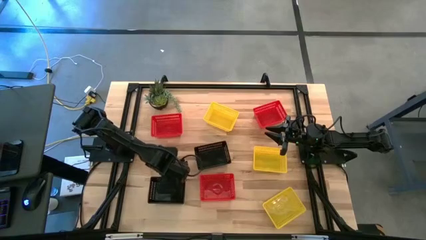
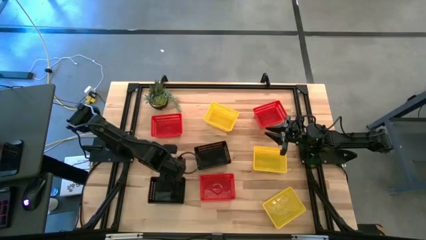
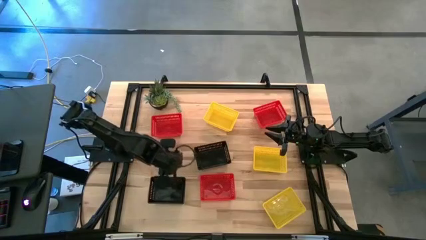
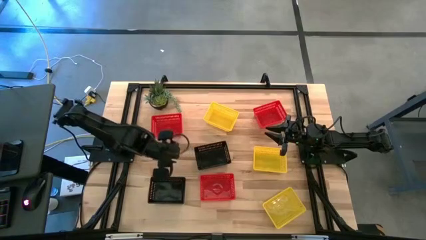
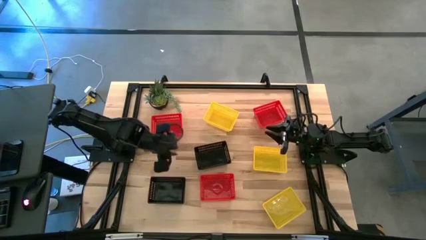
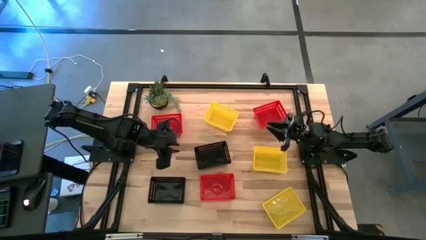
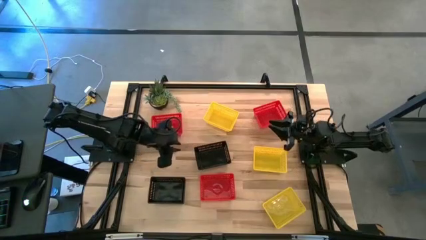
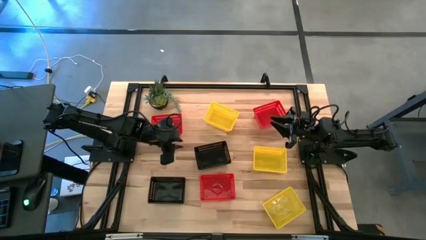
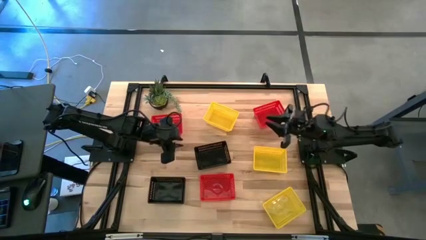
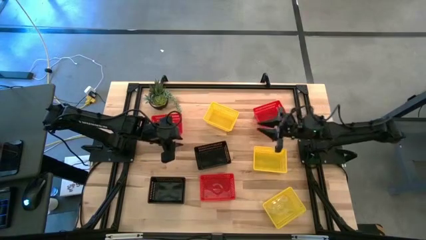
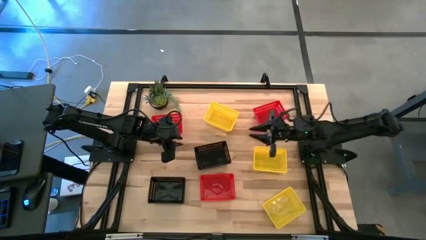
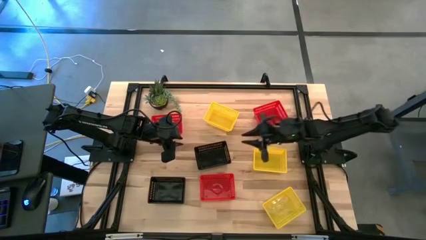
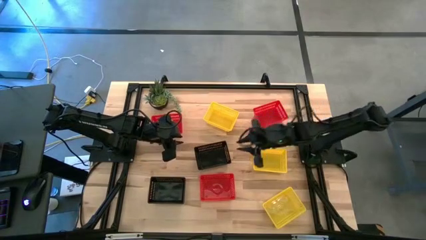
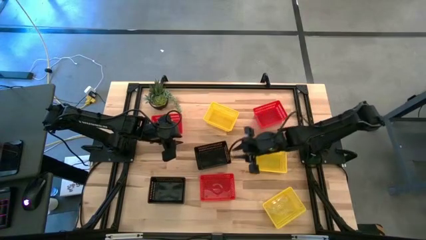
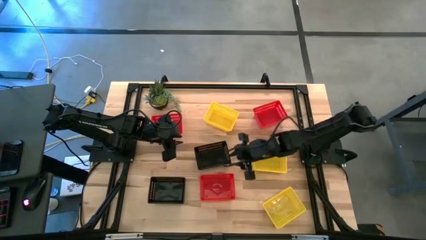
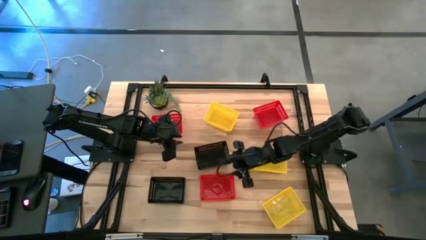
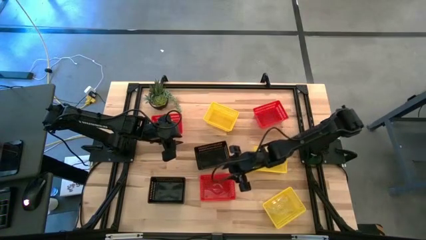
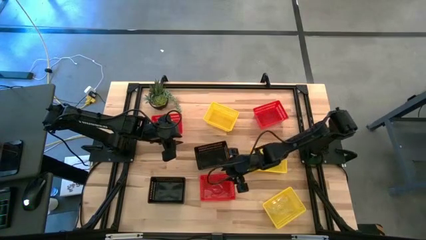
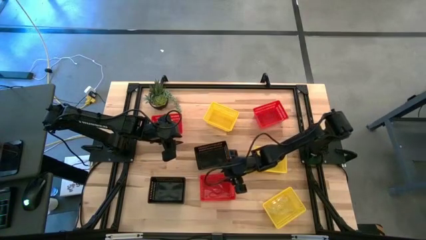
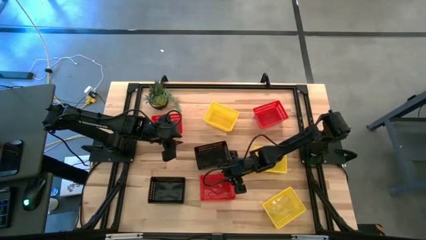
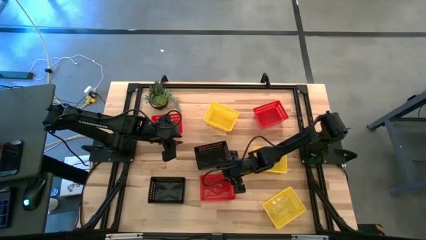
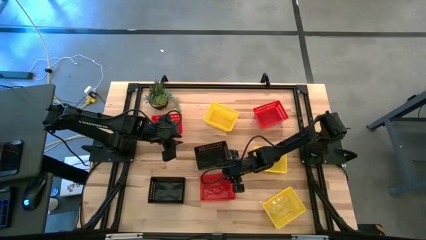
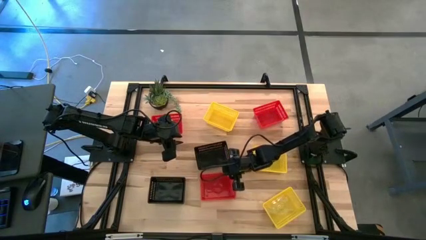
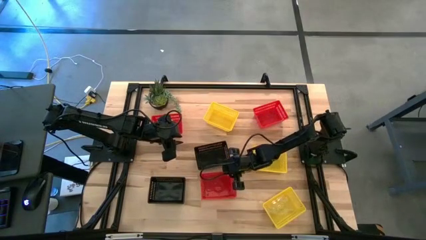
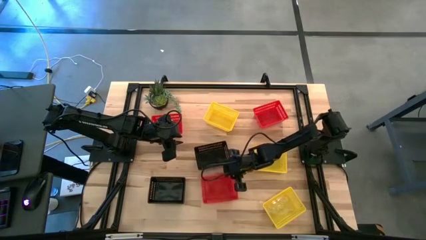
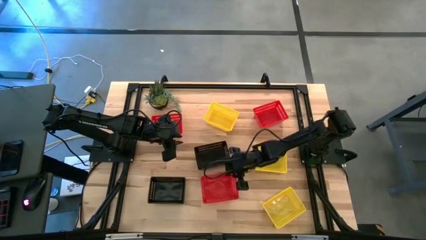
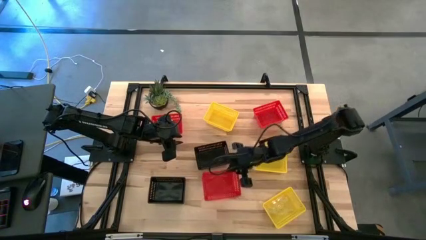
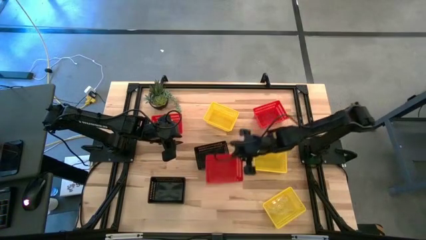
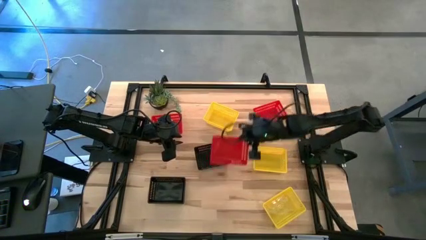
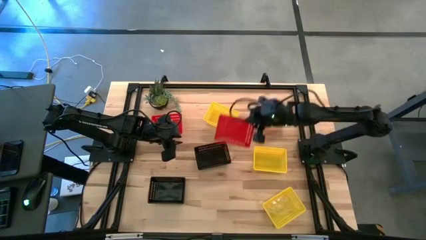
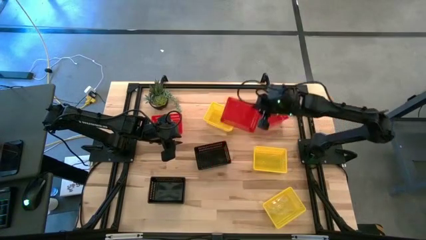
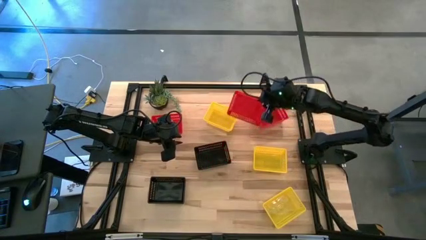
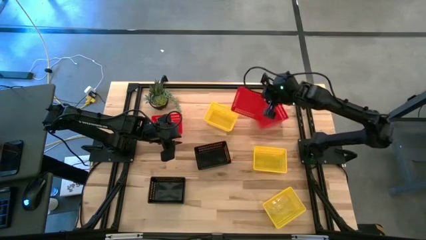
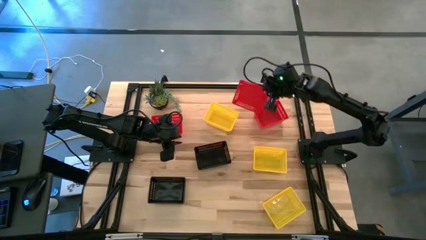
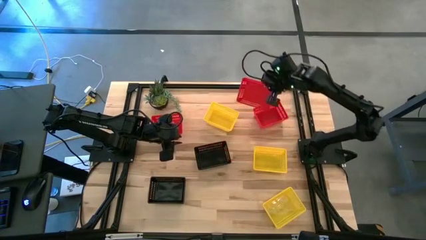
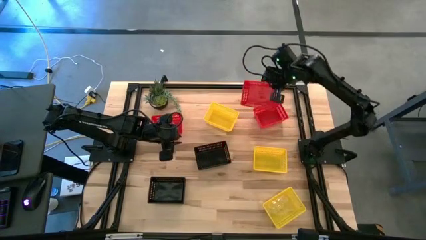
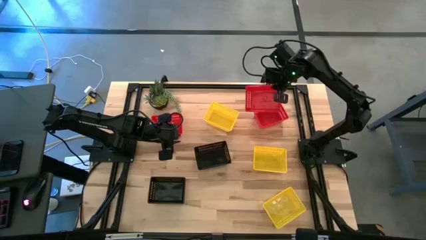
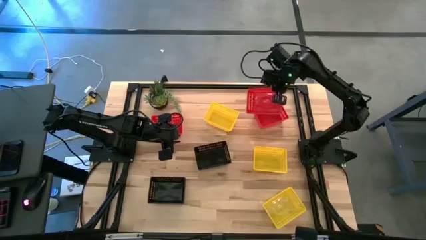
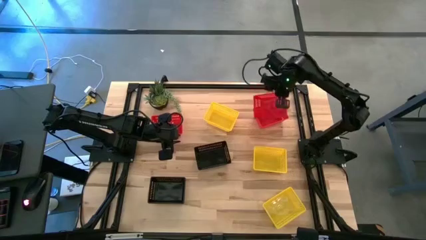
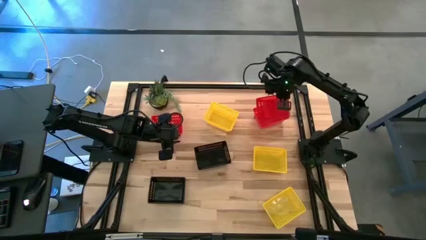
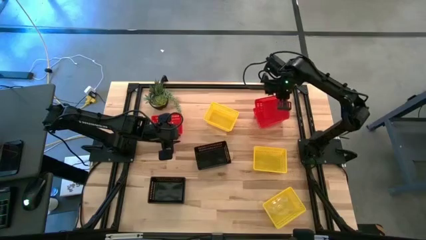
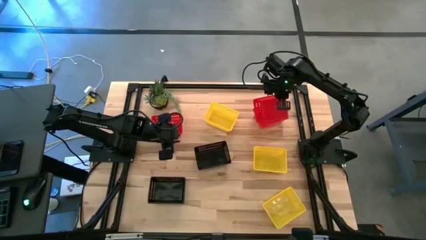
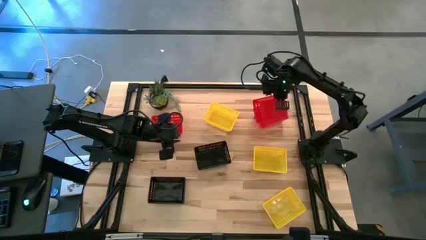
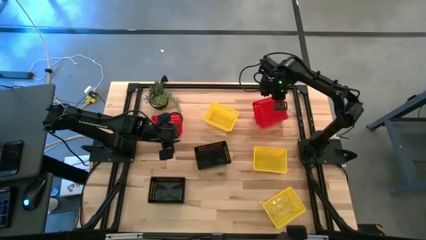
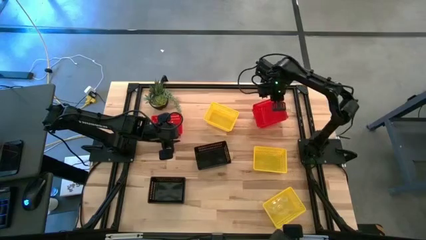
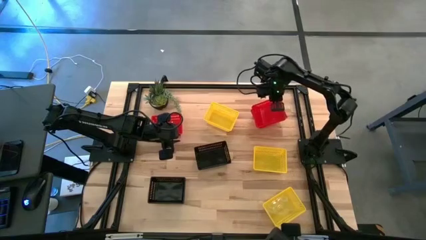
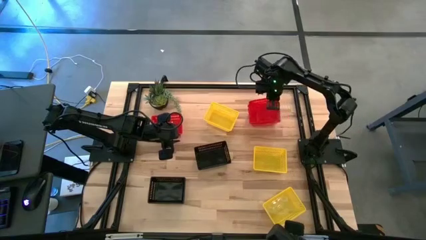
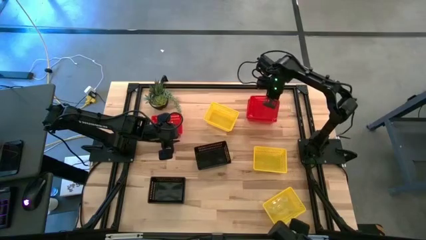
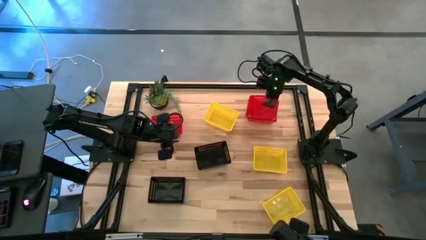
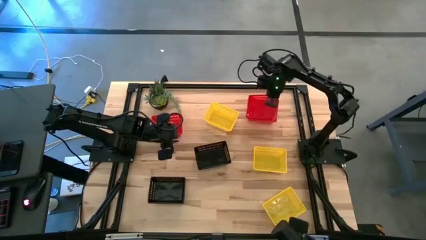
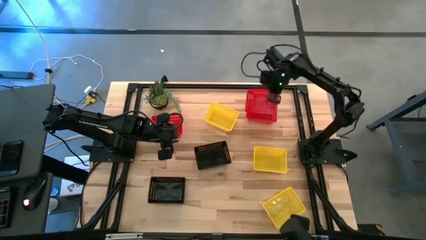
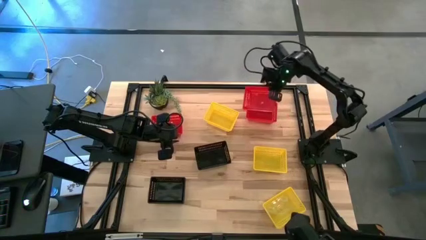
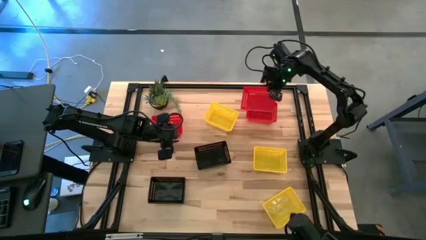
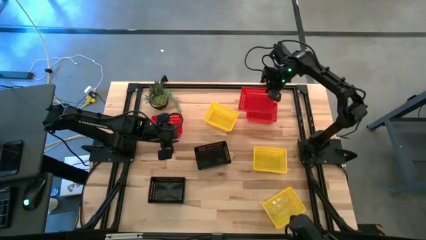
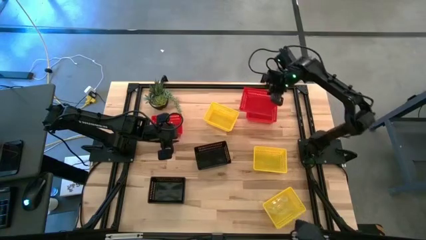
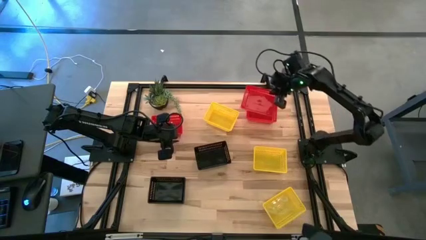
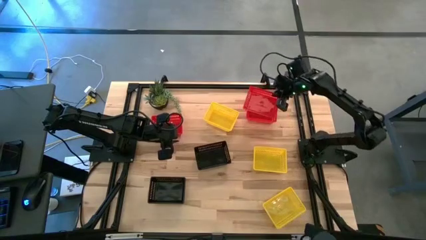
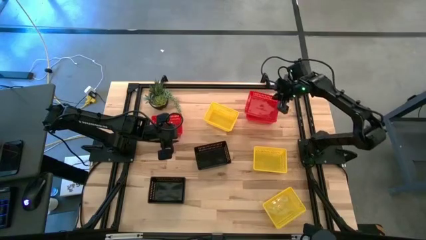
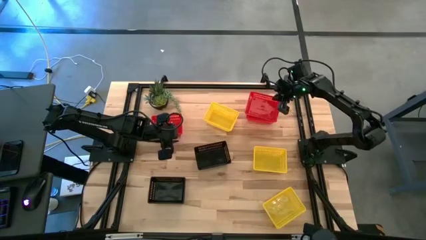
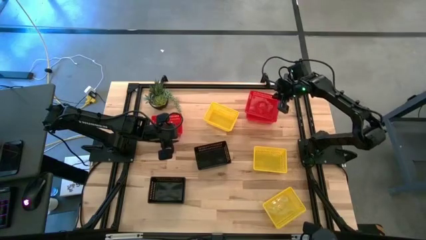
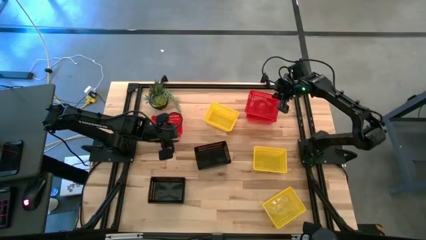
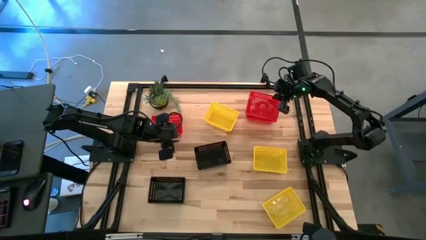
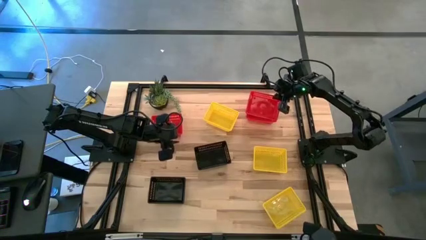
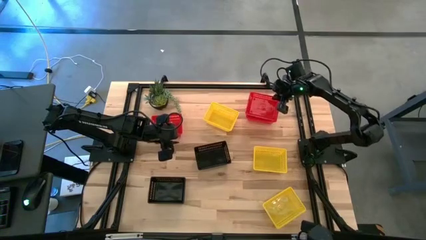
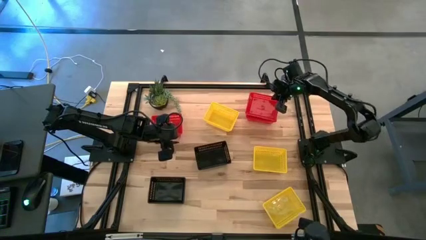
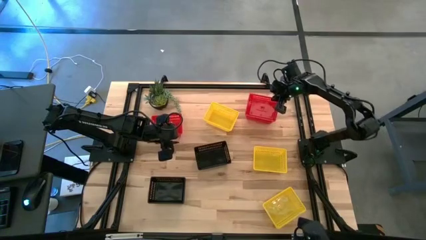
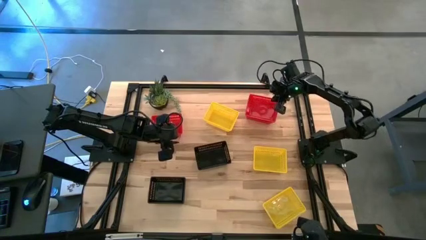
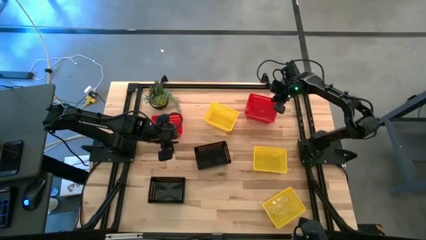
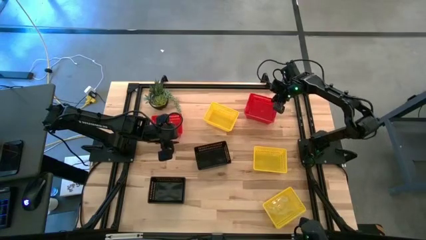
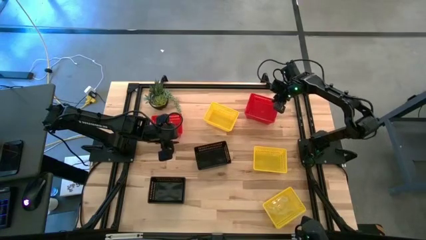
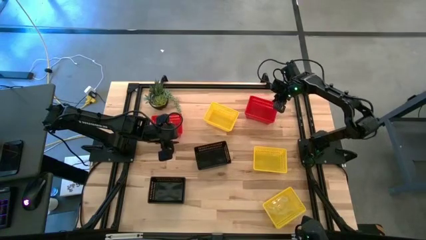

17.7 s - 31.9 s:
Stack the bottom red bin on top of the top right red bin
